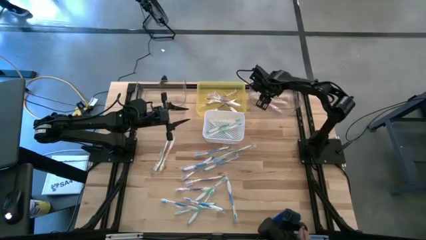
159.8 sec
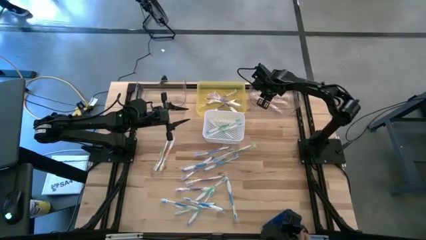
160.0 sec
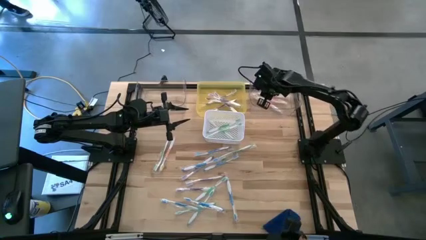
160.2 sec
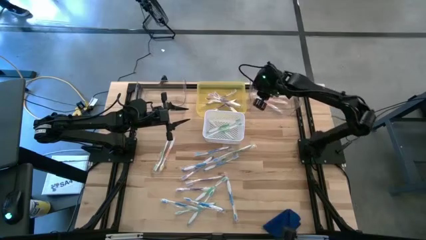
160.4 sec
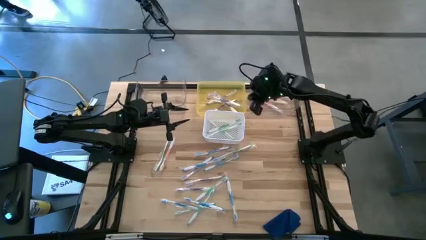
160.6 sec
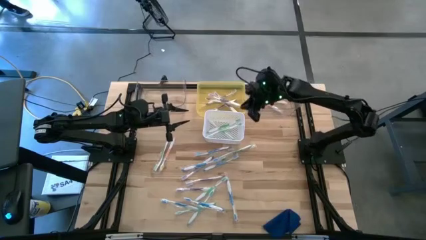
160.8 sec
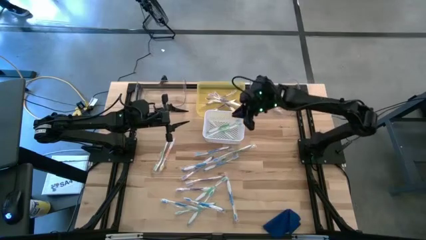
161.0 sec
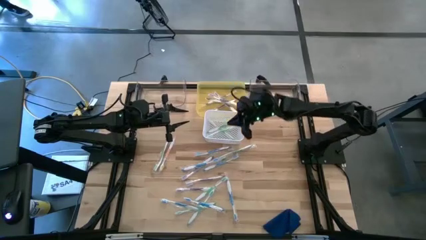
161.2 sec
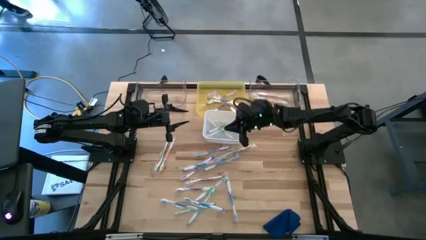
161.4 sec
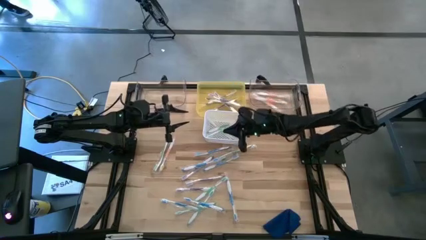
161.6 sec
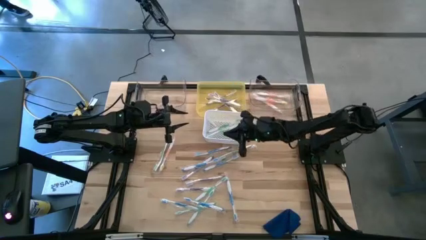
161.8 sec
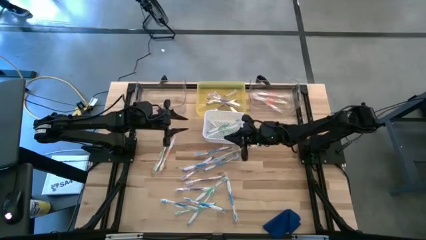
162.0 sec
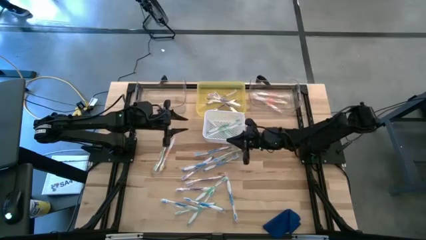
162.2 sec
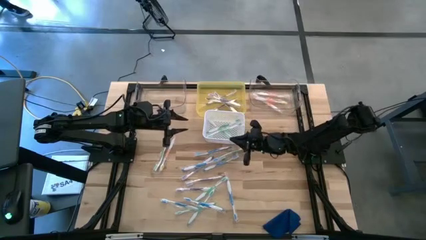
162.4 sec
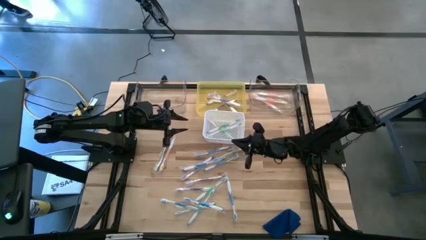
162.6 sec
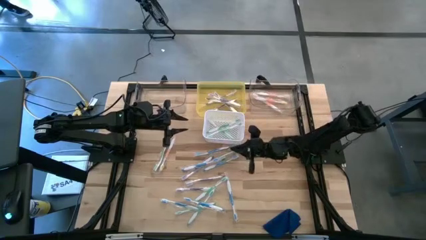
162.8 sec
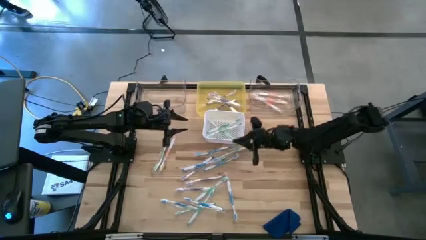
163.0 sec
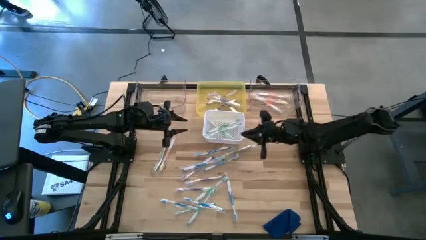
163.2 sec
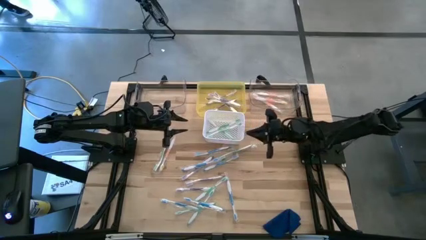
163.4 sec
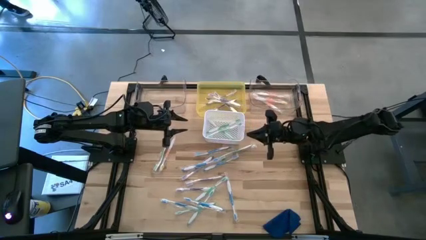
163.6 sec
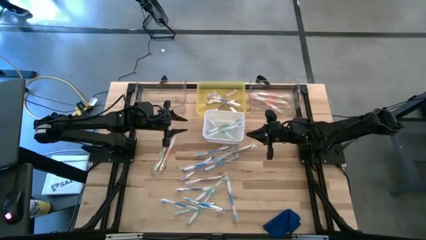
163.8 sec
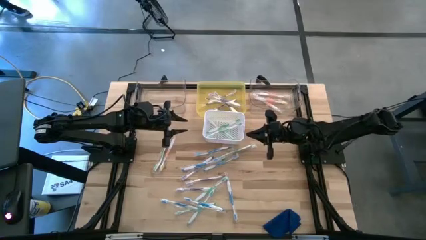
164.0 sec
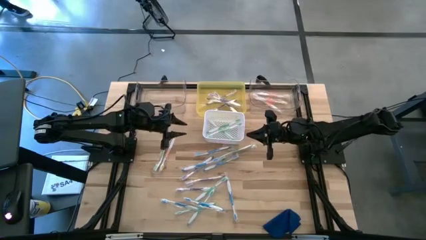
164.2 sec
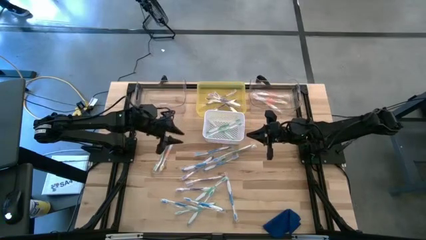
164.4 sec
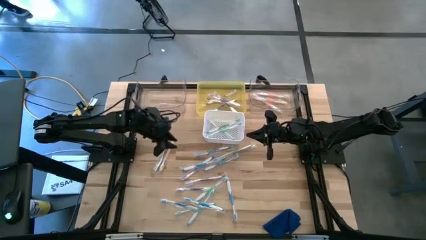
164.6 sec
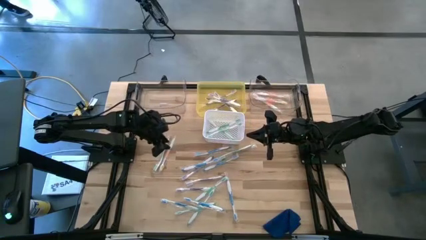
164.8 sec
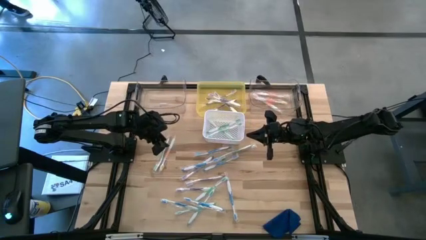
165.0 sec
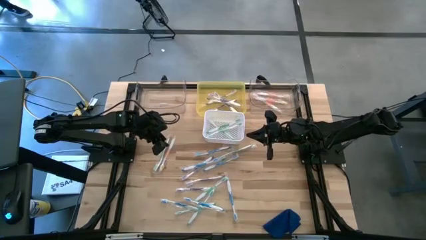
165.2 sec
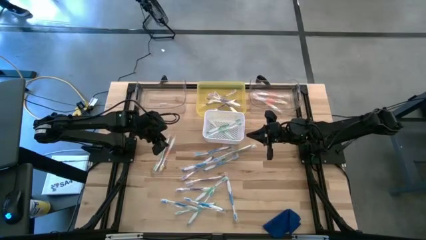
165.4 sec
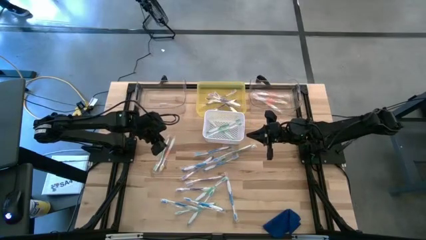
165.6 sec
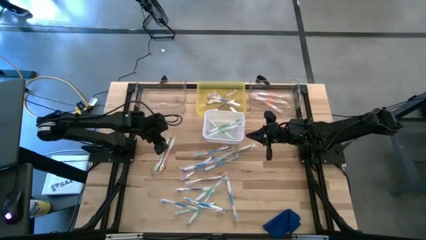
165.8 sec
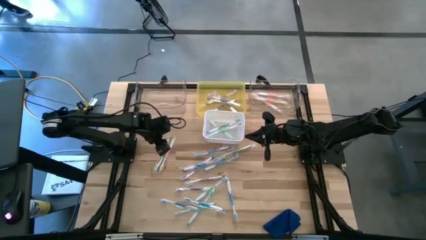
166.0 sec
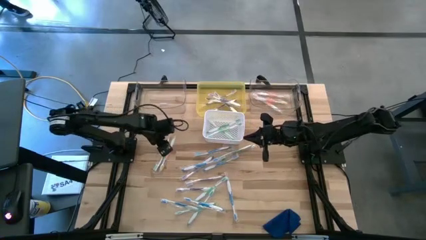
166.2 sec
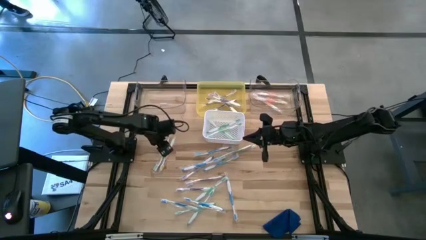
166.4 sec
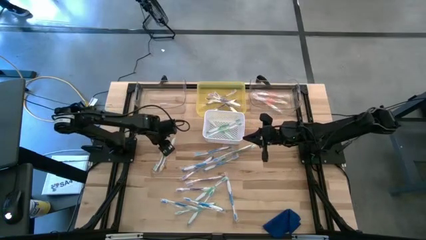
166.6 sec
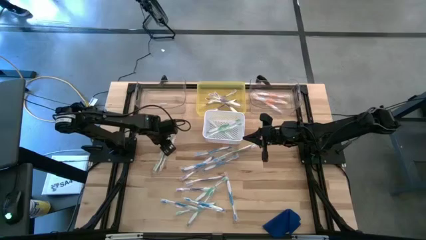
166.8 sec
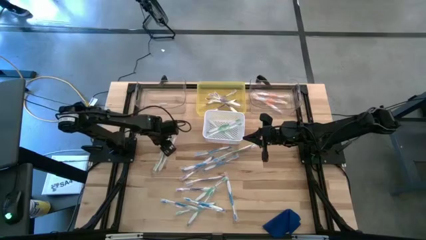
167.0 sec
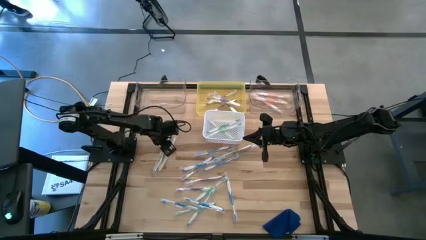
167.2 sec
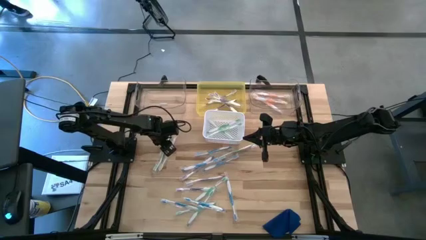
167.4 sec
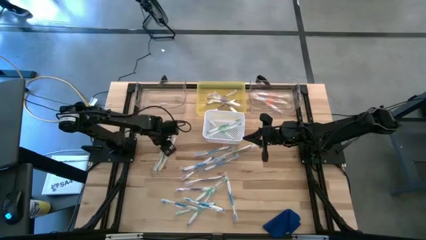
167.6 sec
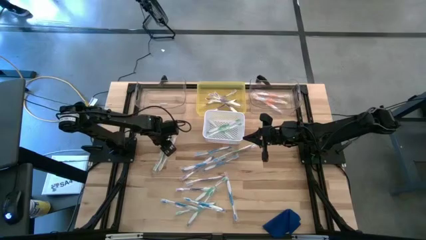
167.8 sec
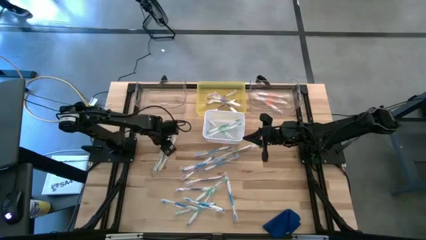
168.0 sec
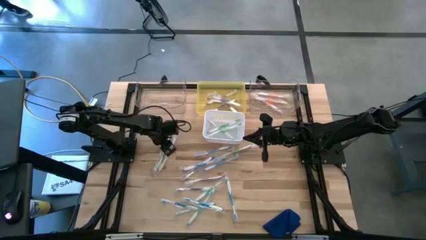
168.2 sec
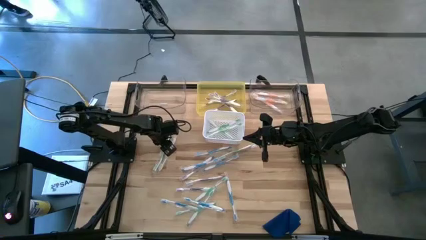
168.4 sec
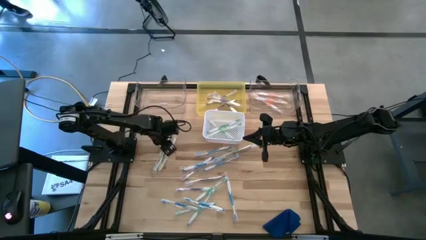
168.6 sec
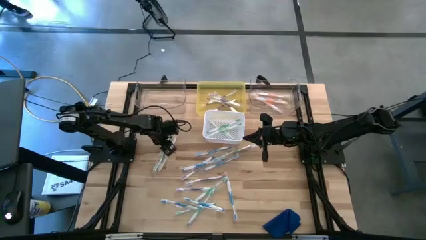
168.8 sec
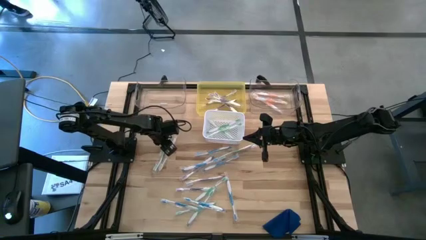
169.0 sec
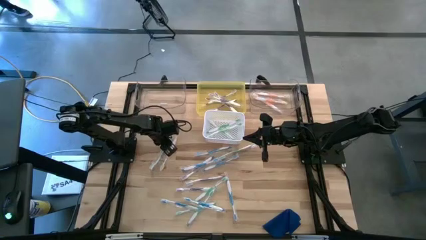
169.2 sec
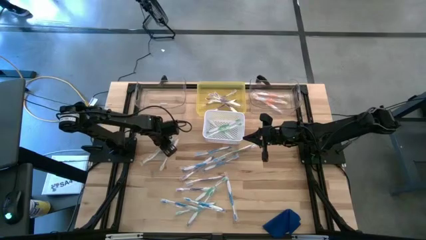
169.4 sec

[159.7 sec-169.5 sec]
Task: Pick & Place Toothbrushes
Put the green toothbrush into the white bin

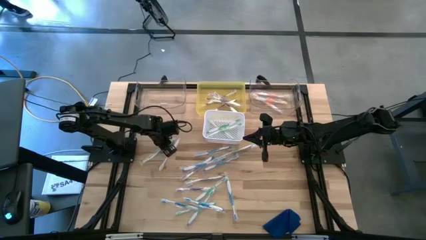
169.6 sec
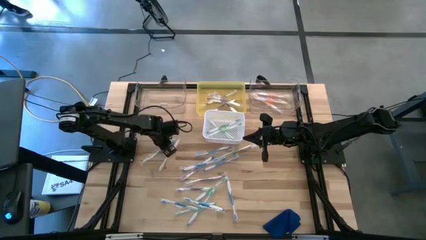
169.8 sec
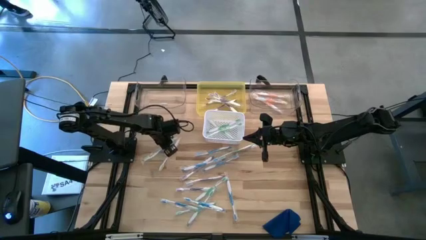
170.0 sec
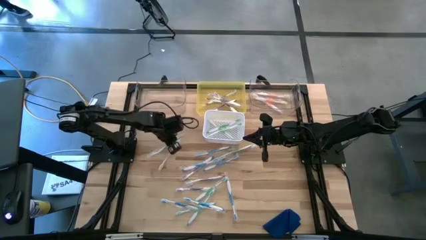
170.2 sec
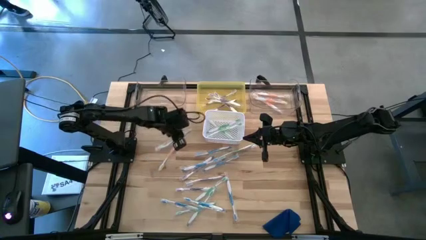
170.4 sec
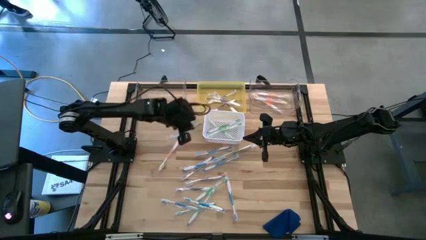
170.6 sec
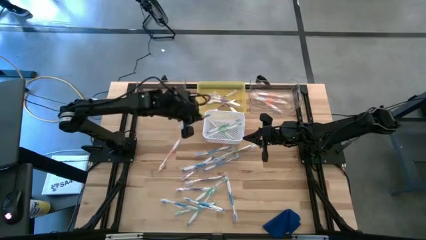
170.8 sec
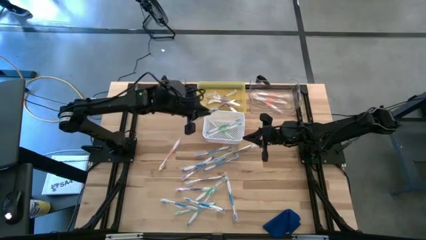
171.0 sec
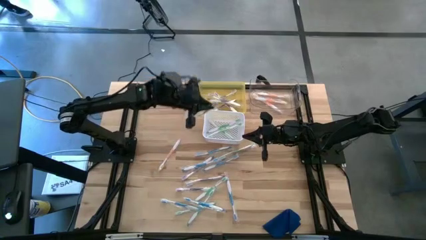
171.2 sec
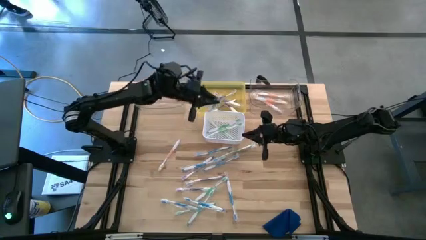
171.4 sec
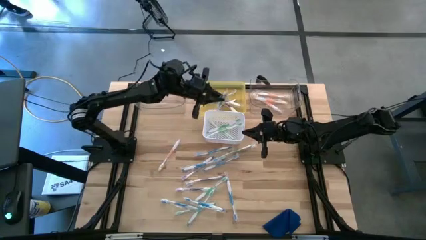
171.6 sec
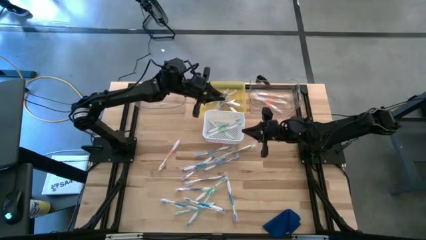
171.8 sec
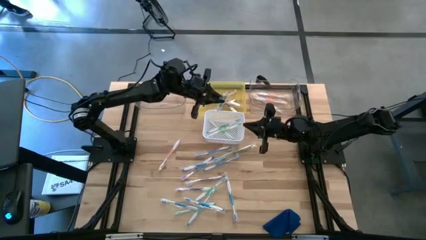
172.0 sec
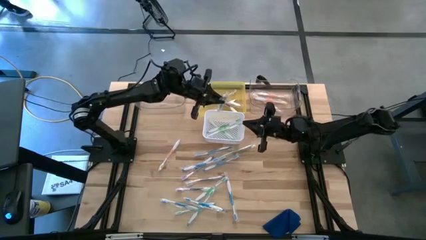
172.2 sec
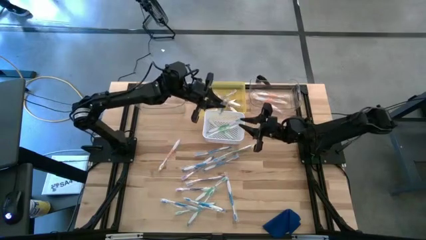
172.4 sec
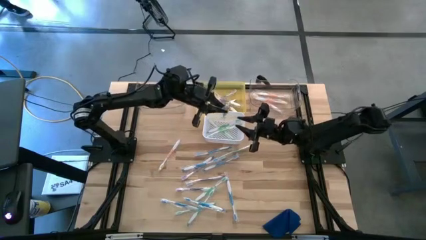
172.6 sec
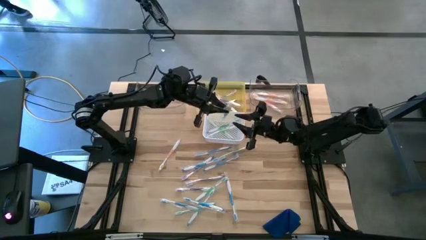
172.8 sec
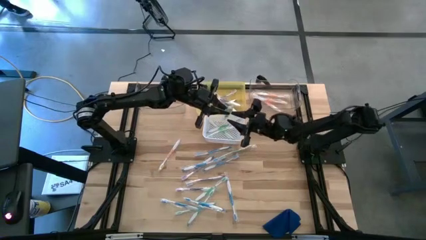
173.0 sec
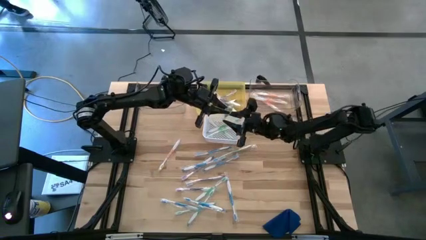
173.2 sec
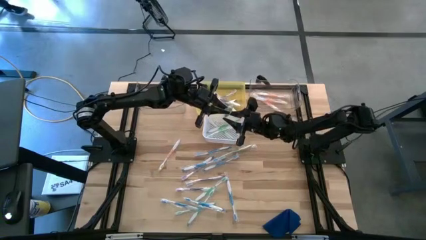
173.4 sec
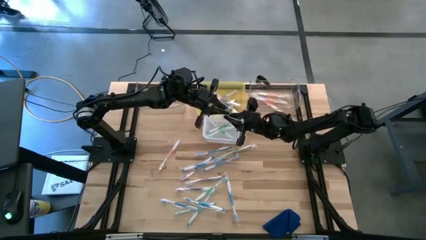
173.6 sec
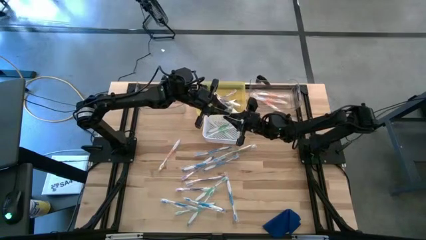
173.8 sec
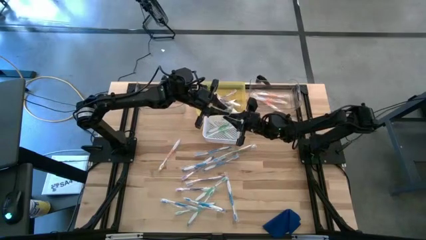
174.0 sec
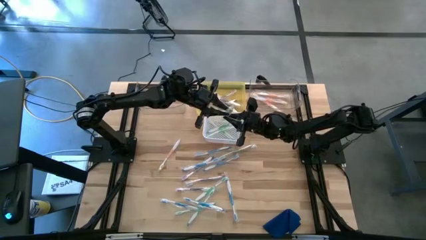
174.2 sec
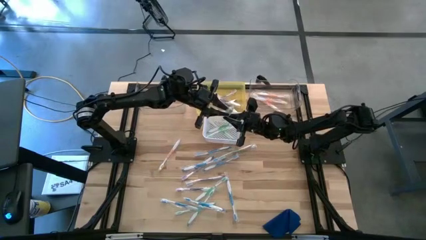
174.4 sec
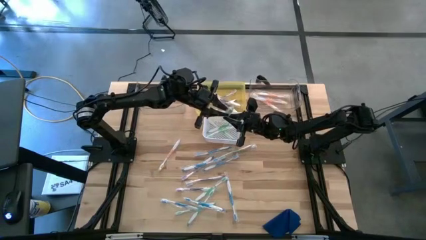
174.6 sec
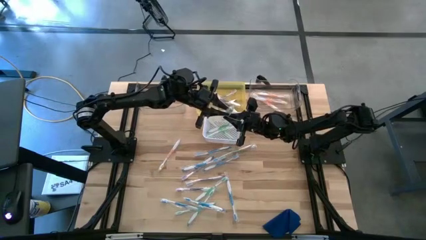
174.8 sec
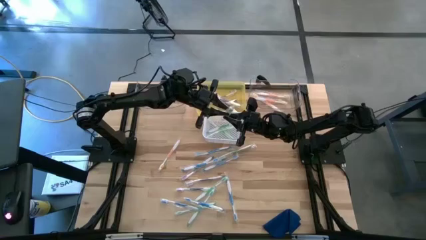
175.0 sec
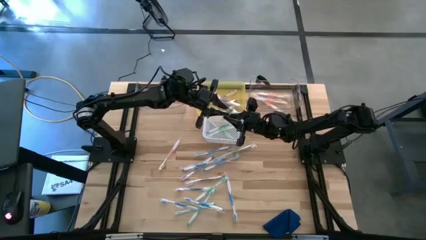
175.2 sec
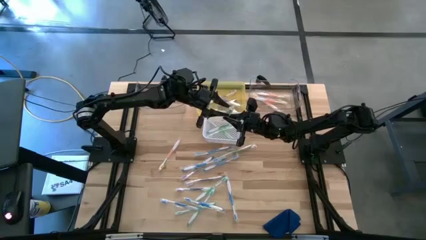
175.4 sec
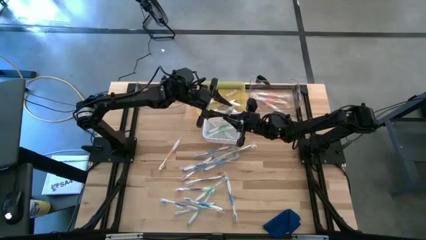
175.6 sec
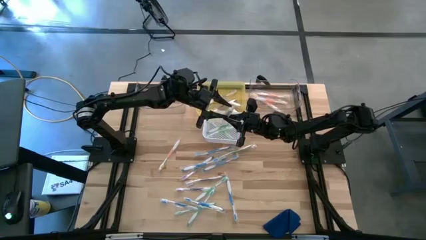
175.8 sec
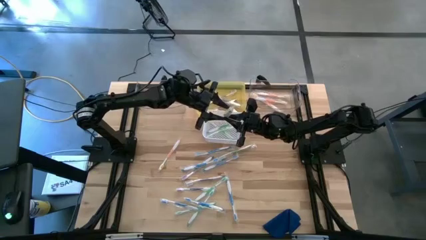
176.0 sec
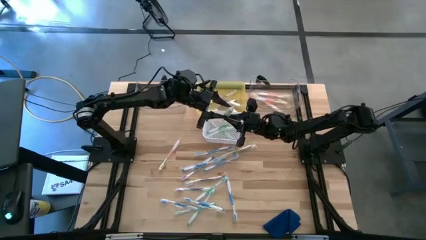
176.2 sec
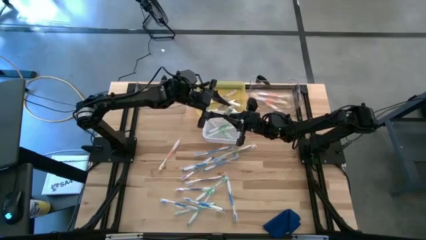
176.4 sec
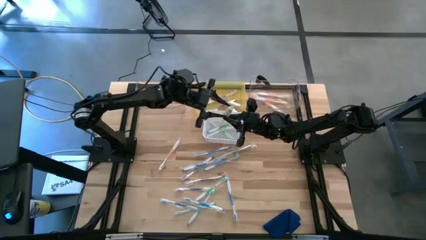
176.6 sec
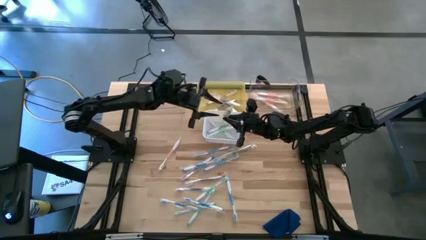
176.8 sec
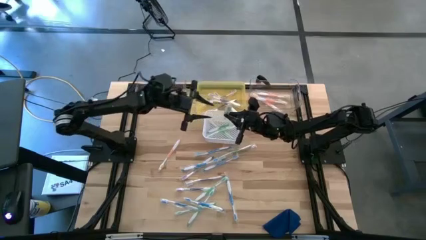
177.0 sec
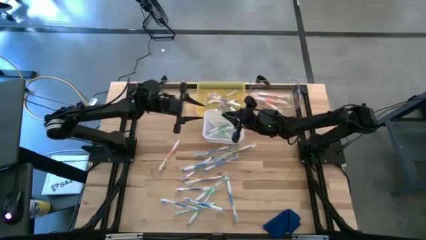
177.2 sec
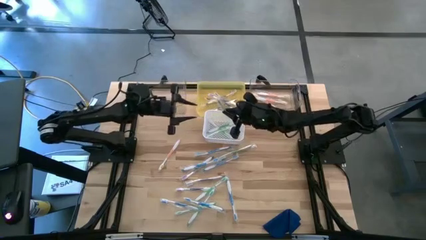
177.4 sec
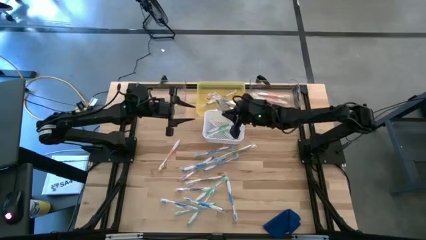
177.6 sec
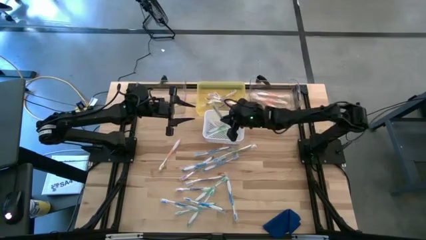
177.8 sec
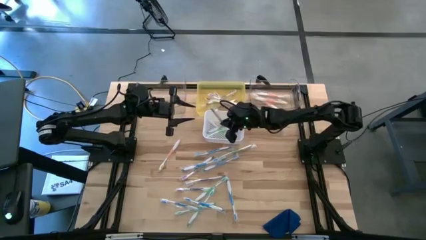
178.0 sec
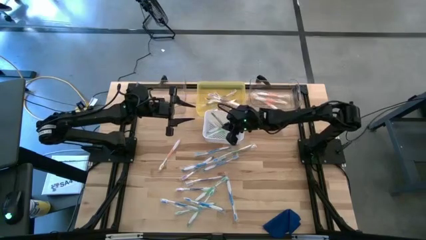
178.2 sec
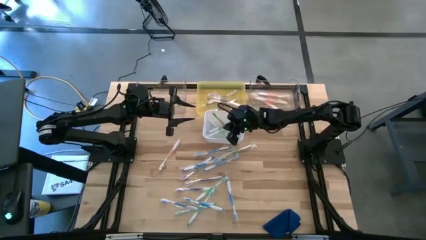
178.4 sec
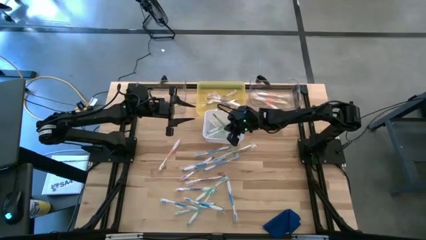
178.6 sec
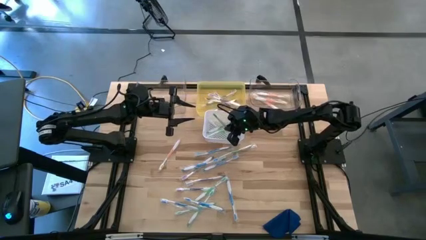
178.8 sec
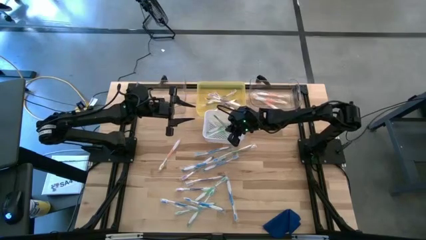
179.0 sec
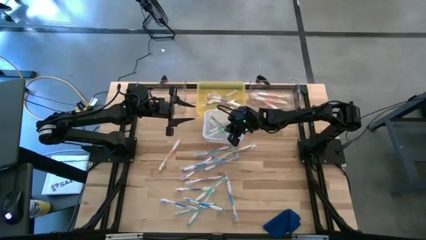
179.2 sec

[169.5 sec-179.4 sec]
Put the green toothbrush into the white bin
